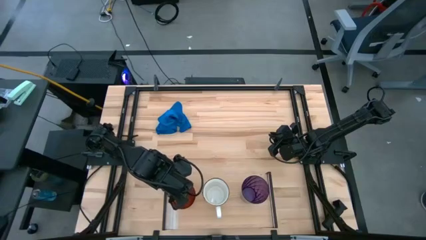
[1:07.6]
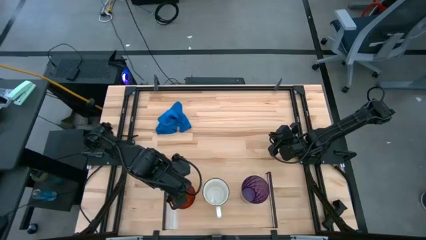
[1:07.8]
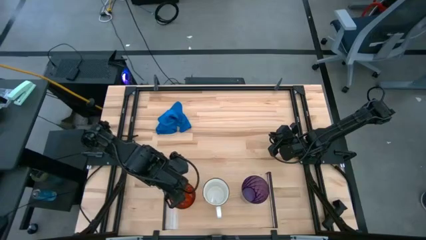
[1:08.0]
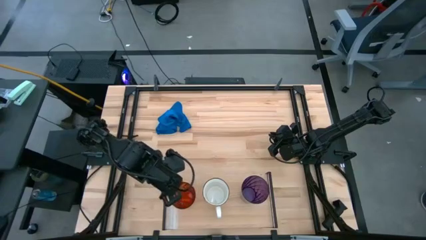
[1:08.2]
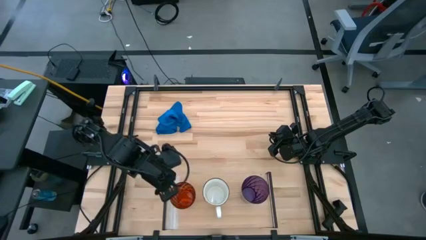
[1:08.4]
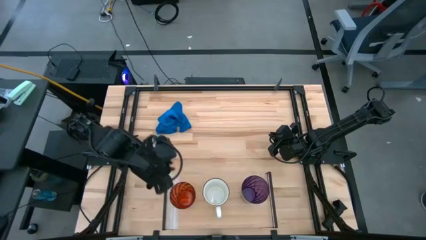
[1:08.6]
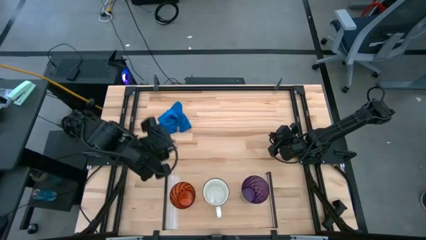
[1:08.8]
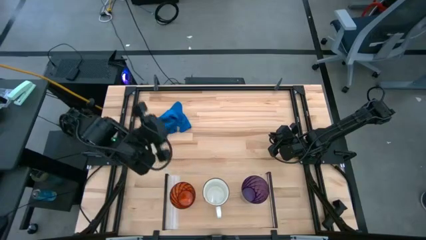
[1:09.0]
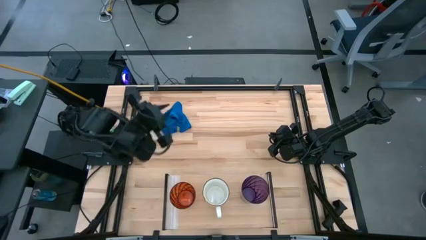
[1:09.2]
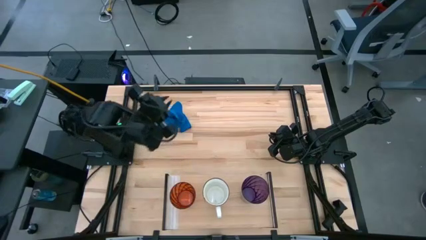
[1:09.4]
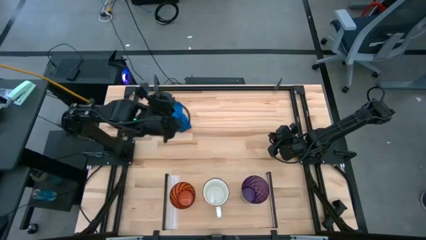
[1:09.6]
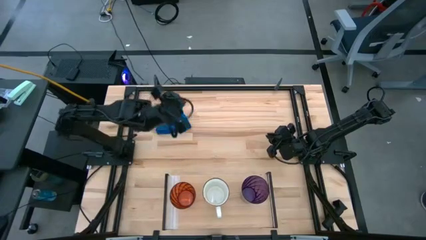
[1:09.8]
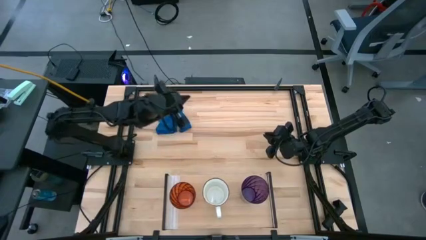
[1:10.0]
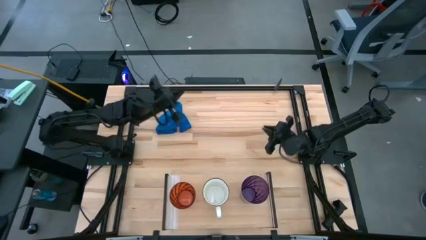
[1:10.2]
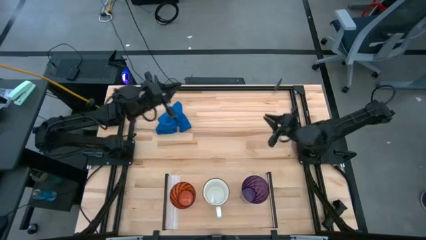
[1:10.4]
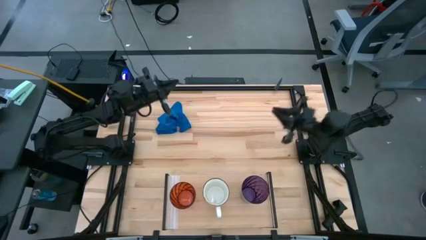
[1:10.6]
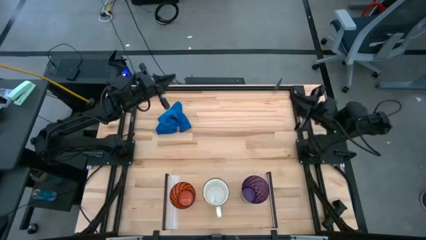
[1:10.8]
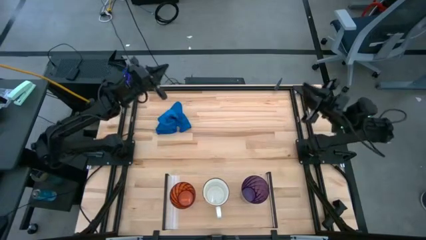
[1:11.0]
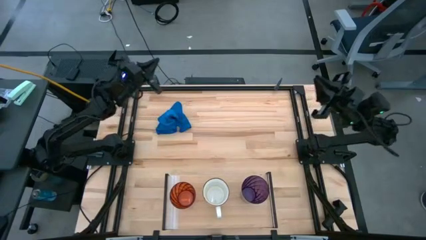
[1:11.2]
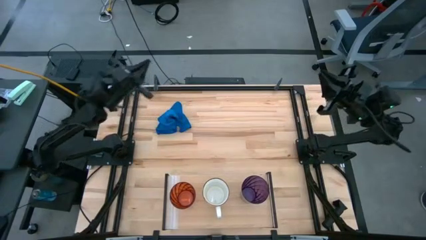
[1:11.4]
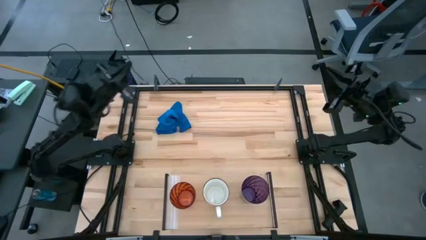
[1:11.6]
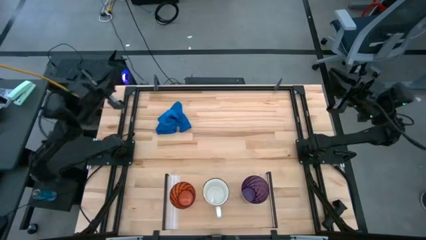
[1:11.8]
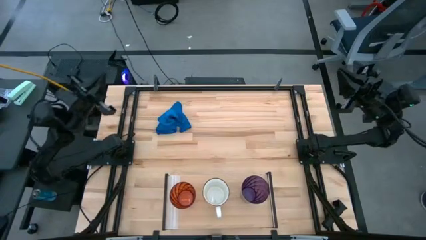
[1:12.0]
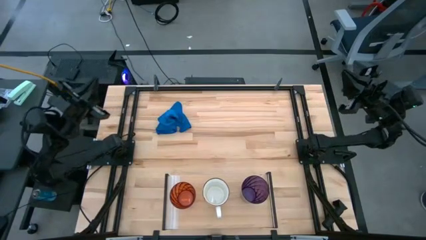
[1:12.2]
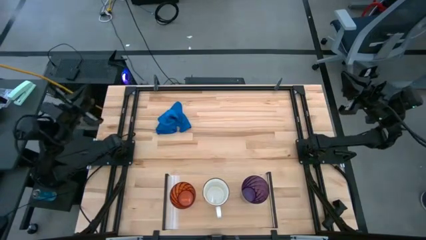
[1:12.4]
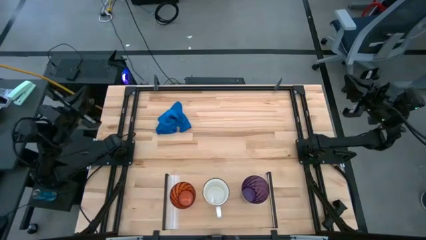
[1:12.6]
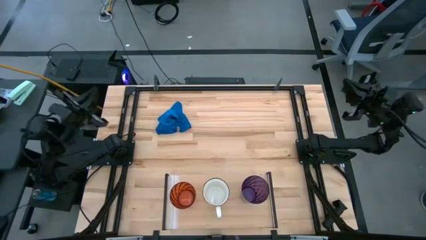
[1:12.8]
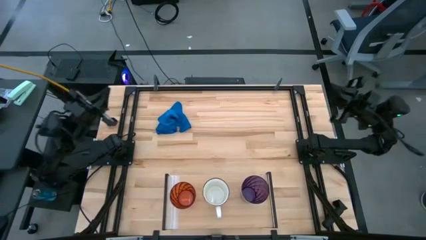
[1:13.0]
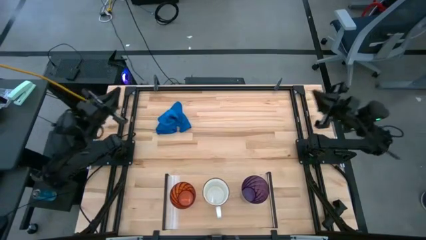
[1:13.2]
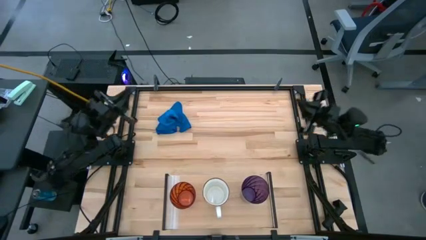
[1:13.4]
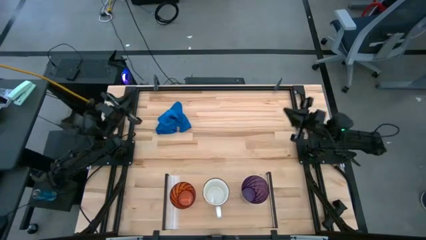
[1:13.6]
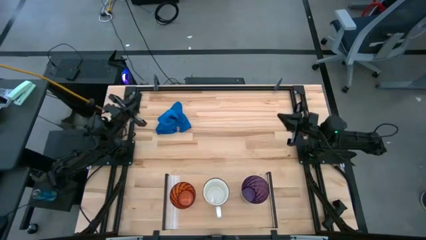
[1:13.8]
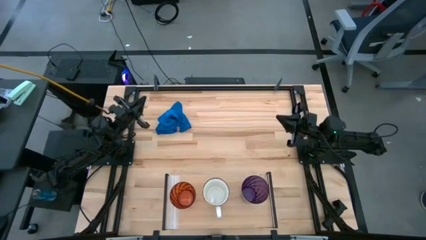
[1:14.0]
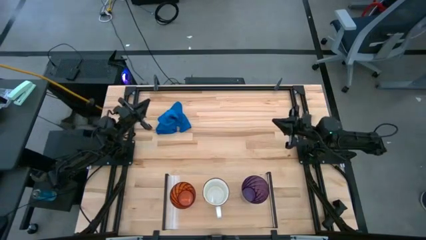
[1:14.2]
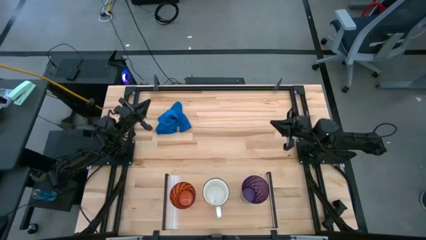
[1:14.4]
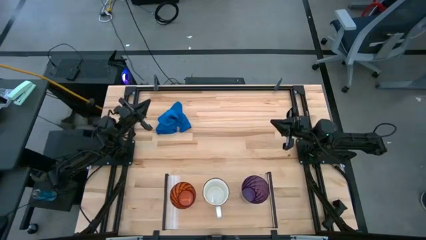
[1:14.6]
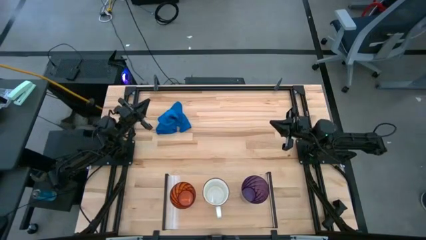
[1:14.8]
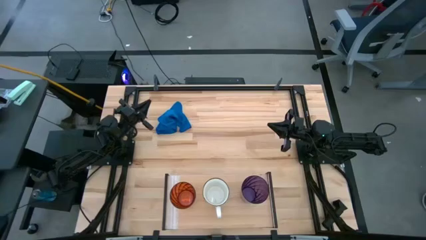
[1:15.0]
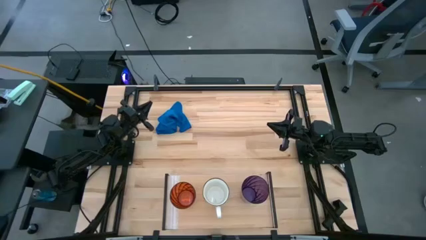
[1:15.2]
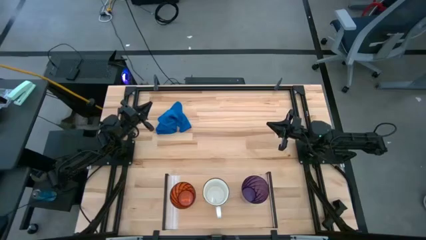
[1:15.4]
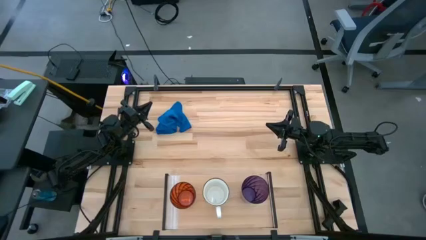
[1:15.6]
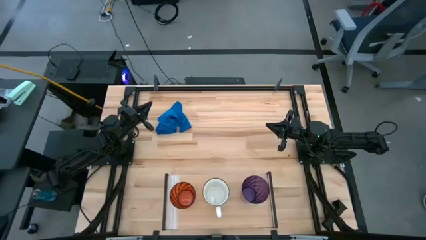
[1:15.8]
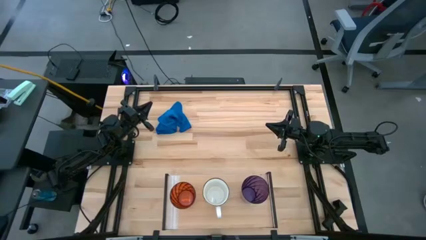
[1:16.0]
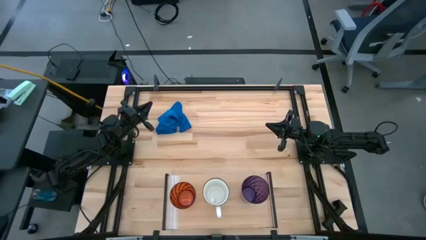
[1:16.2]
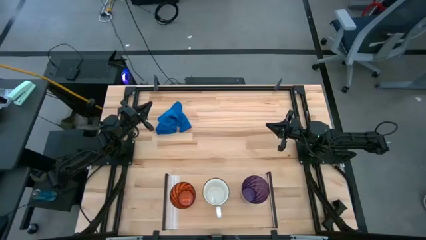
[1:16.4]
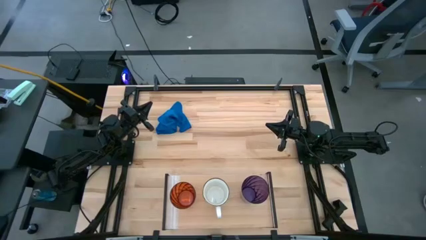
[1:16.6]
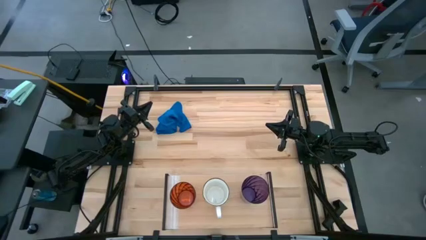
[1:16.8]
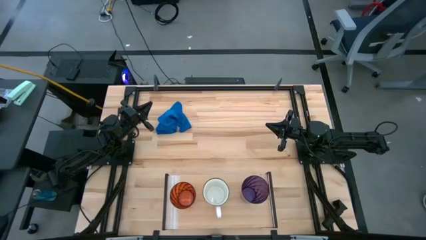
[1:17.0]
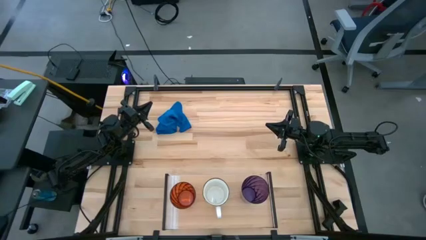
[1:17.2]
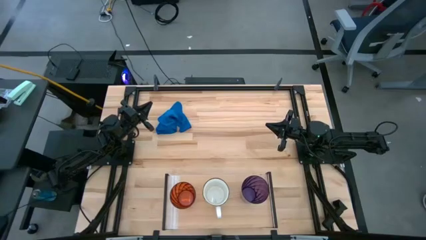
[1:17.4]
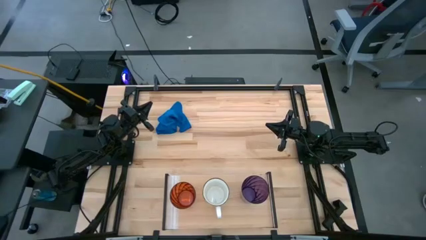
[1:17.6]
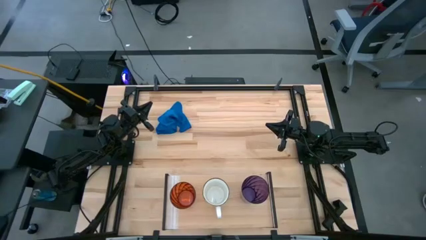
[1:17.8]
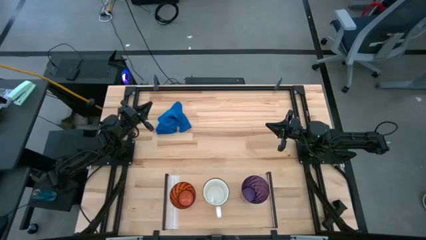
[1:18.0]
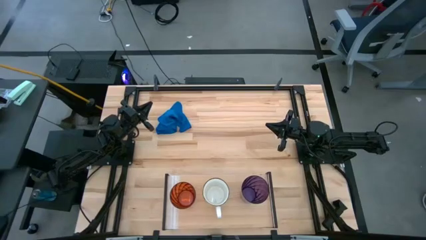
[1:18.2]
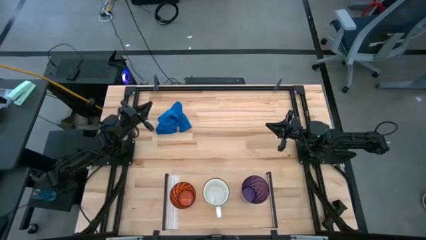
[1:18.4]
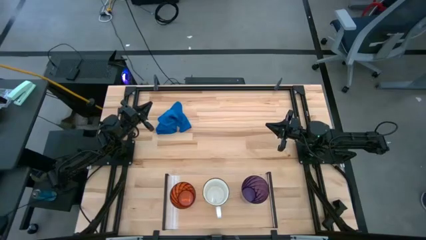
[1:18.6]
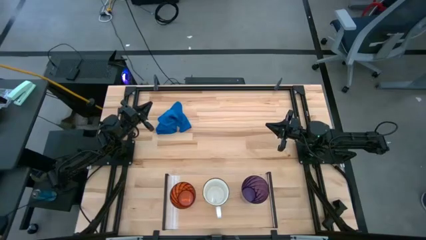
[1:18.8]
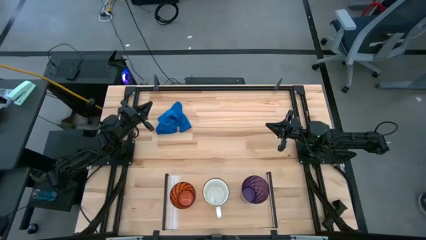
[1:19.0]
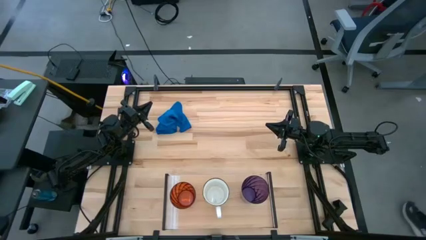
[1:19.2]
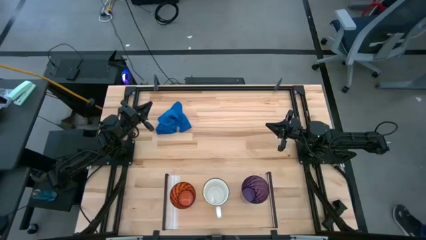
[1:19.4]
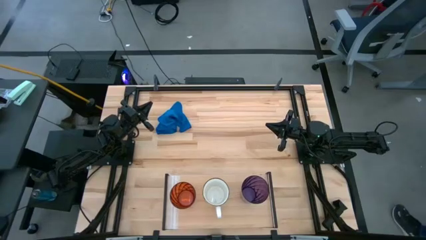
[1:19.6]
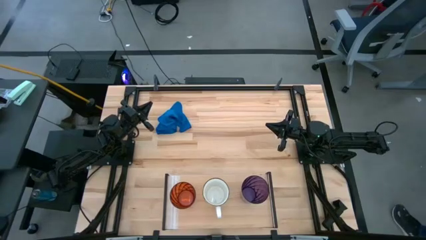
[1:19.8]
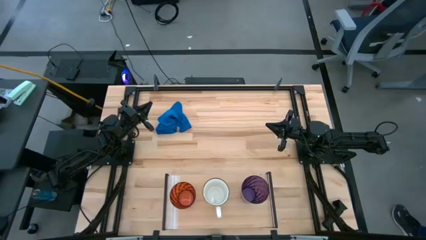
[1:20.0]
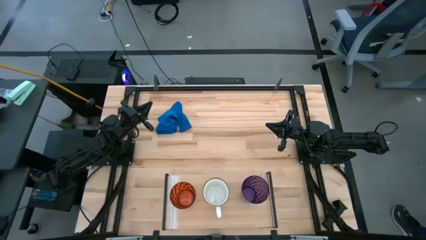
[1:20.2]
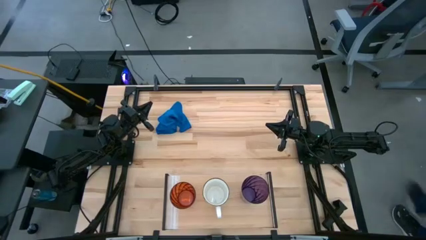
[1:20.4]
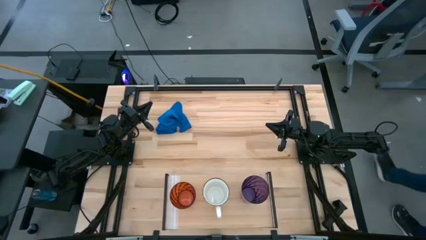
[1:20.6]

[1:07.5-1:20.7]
Task: Stack small to large cups/mugs on shelf
Return to Home Position

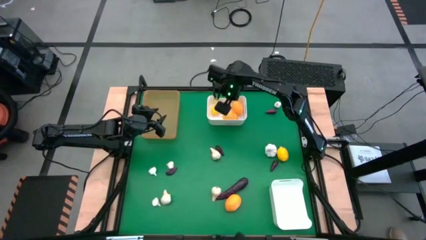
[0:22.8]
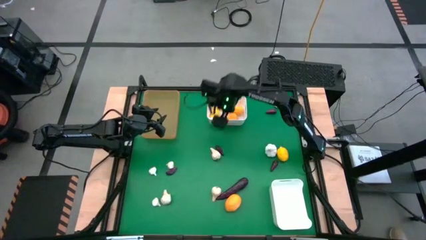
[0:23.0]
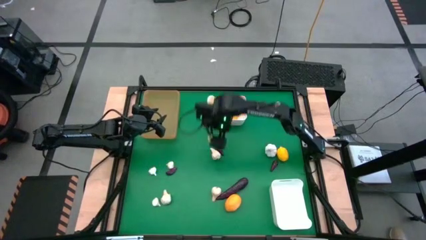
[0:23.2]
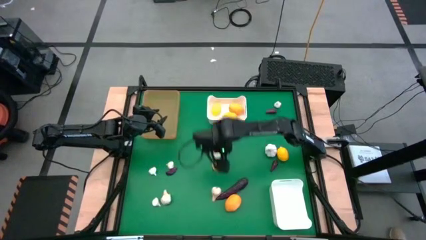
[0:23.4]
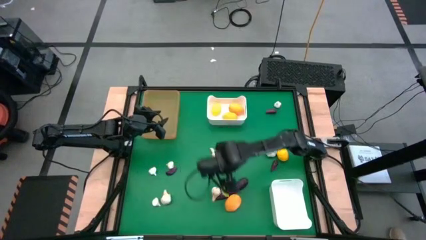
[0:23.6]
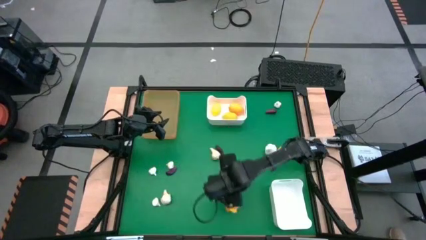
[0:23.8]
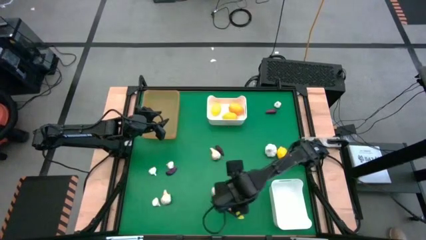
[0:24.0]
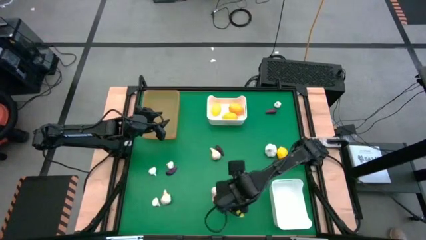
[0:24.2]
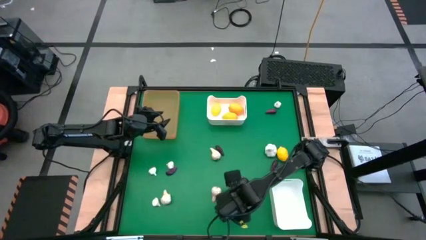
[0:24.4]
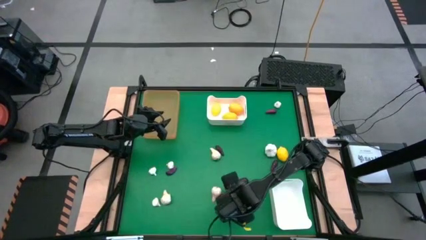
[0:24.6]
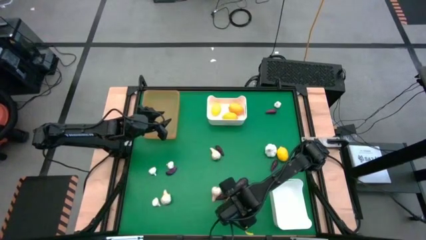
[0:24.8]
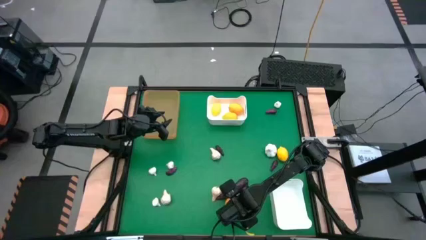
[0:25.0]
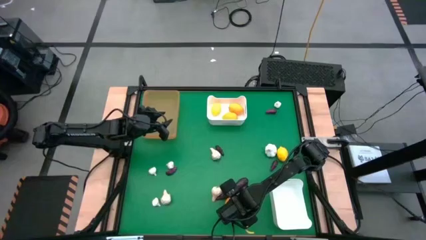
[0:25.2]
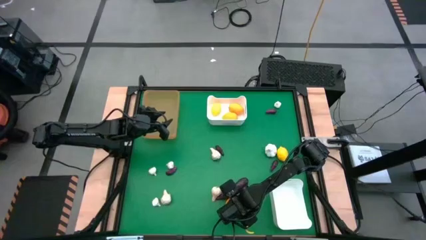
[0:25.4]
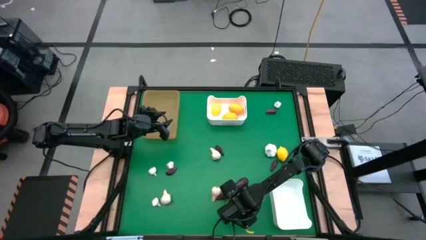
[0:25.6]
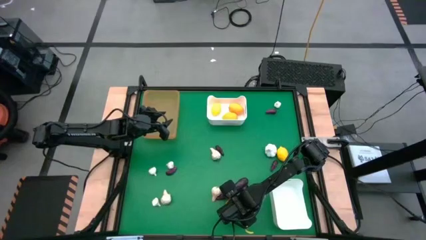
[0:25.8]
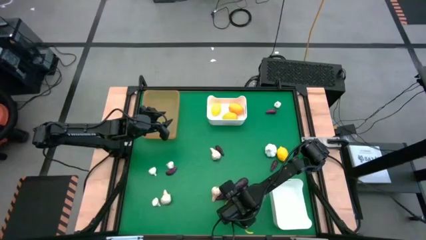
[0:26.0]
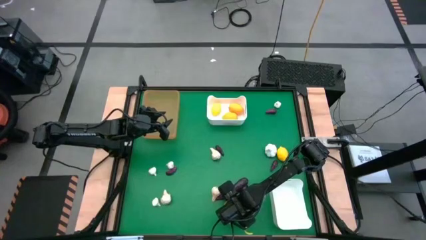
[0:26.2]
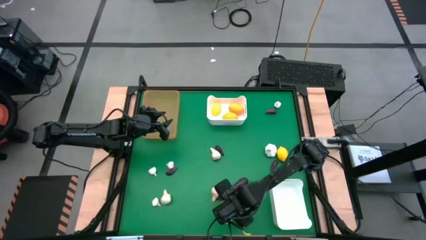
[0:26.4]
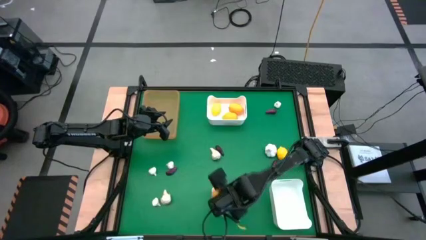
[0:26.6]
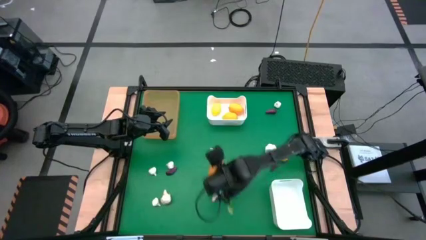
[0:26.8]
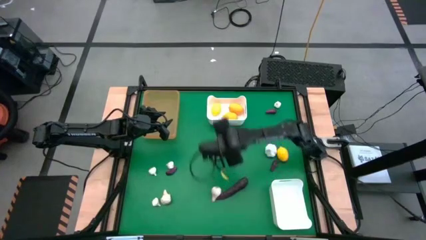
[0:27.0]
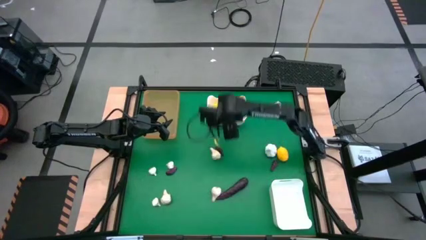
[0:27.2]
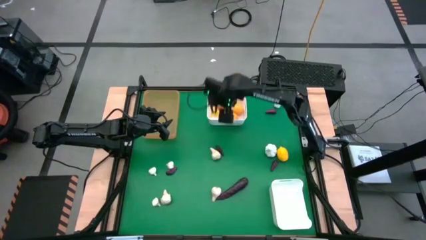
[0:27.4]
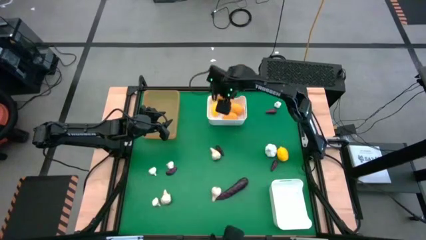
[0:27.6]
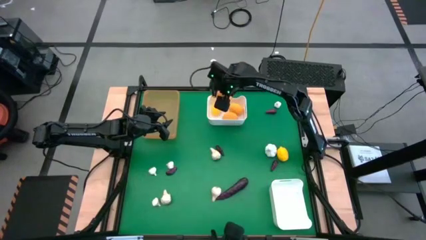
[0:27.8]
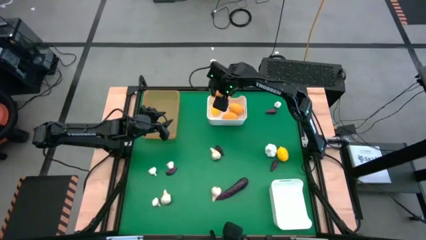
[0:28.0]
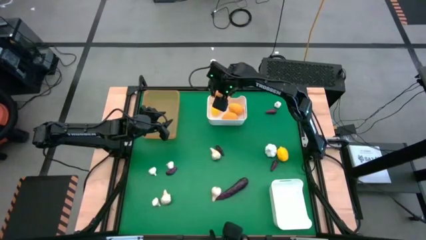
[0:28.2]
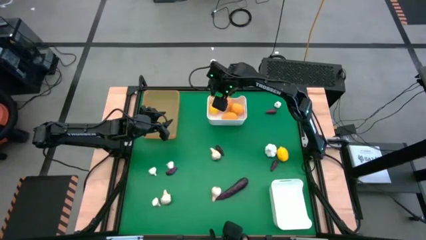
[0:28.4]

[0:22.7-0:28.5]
Task: Sort produce into baskets
Put the lemon into the top white bin
